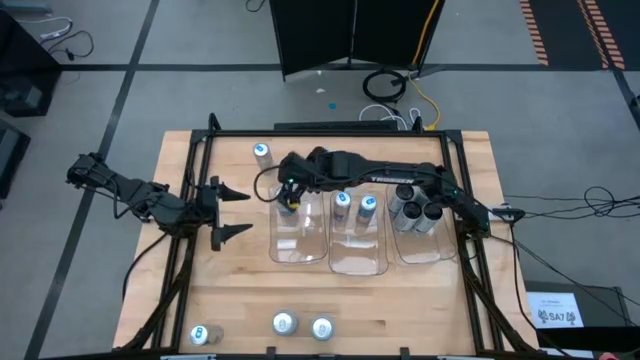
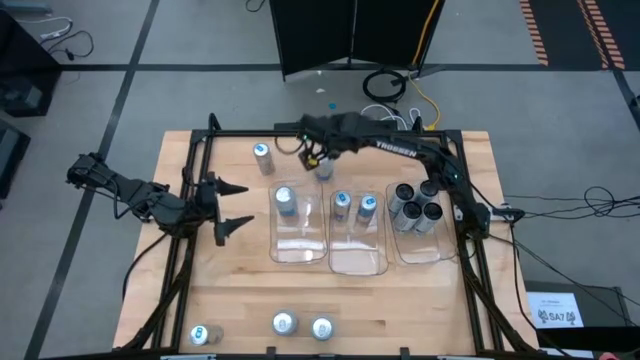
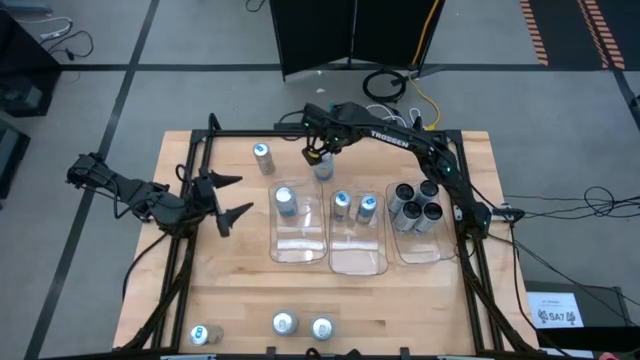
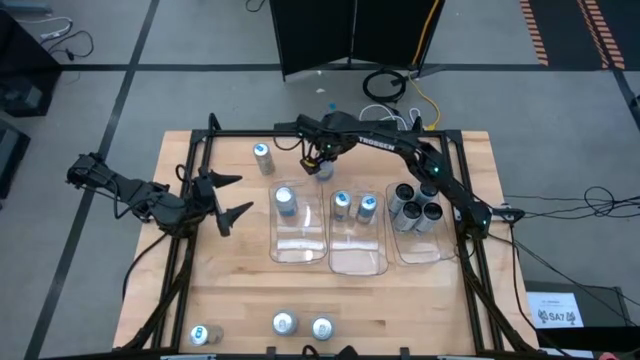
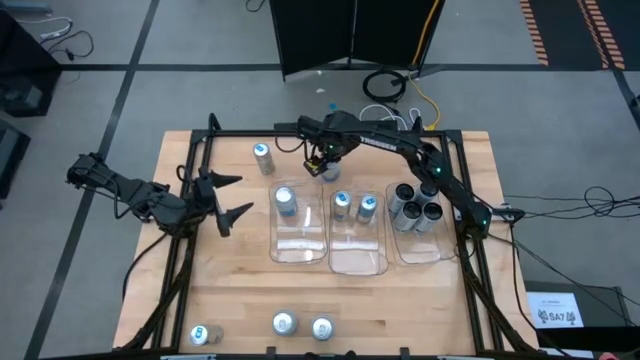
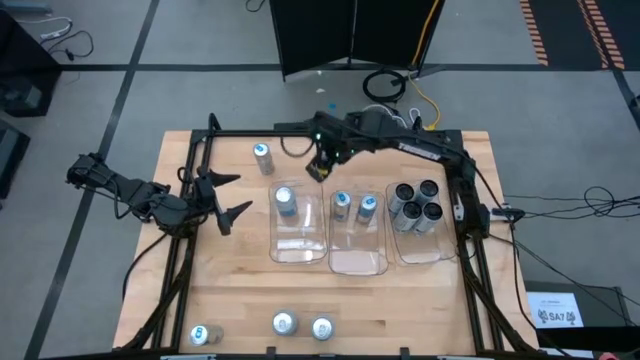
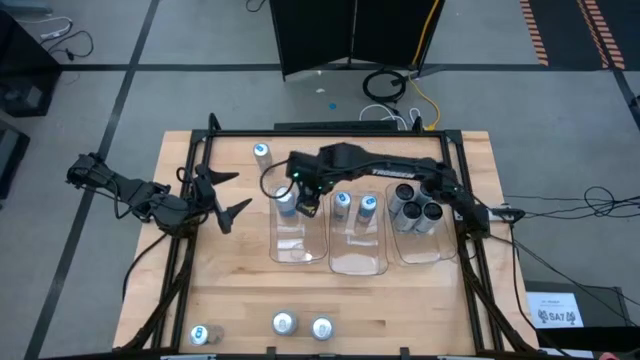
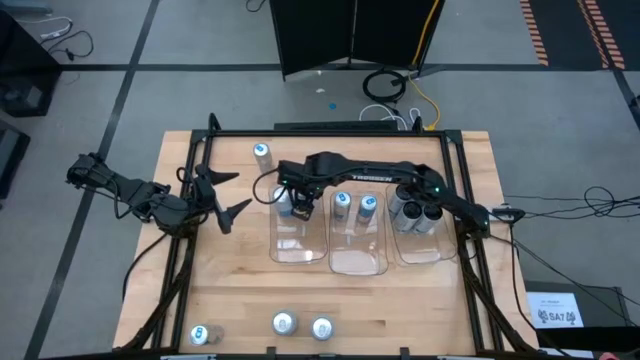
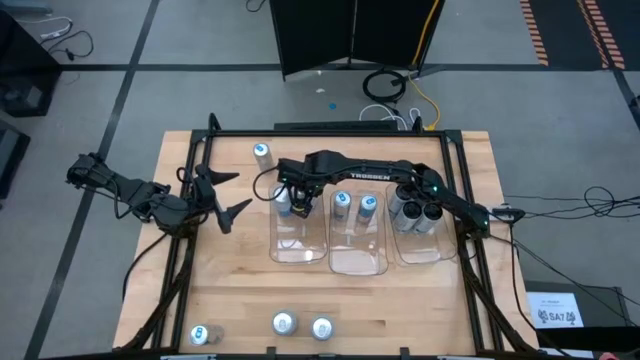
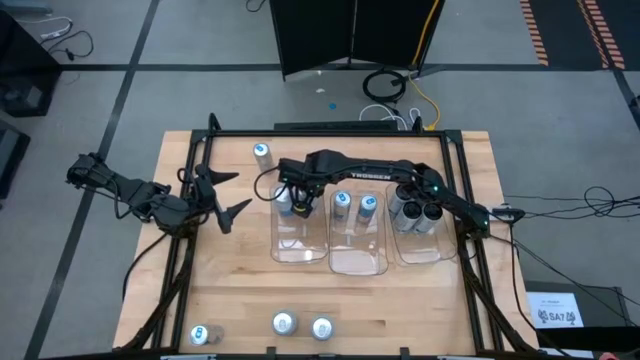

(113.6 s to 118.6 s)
Task: Sort soda cans
Put the top blue-white soda can into the left transparent bin

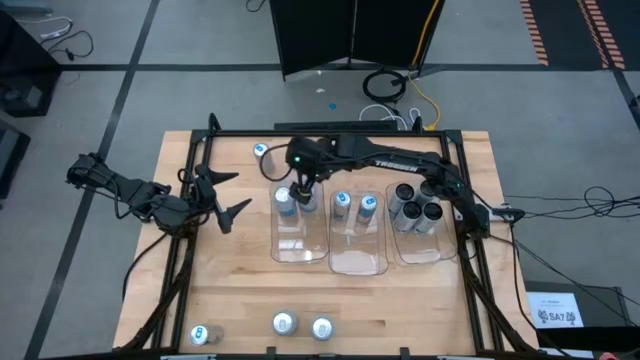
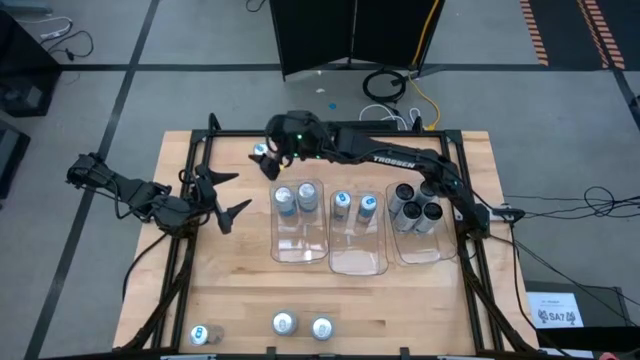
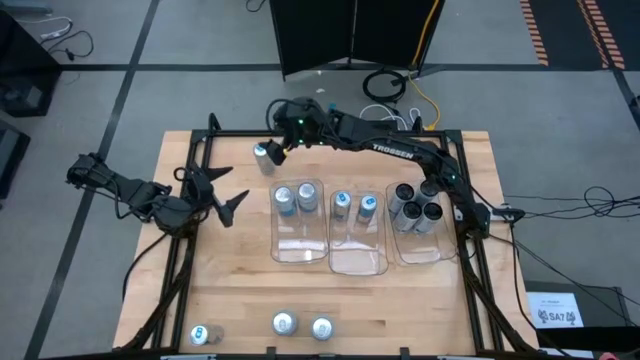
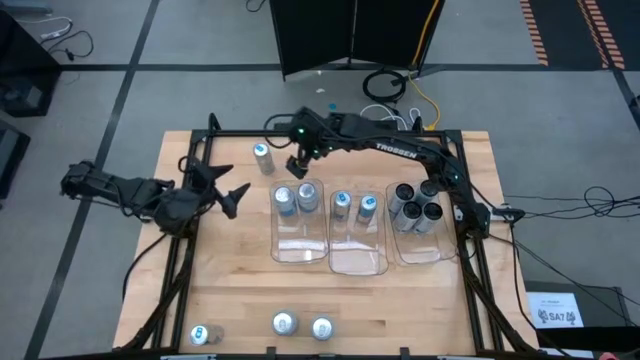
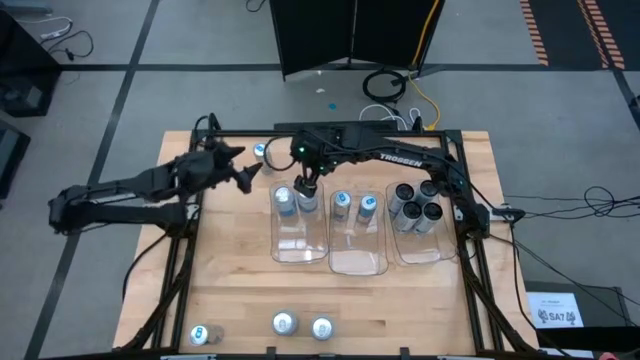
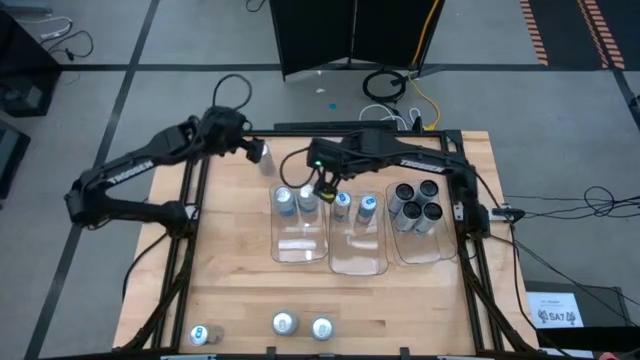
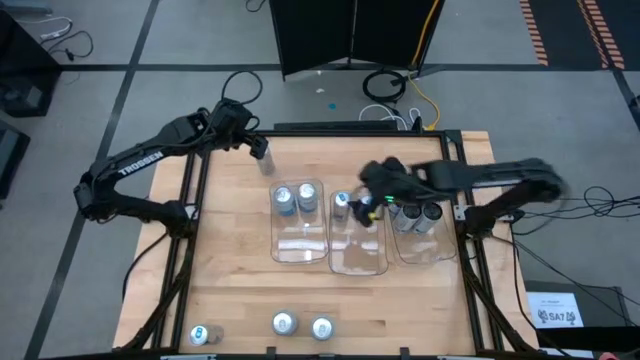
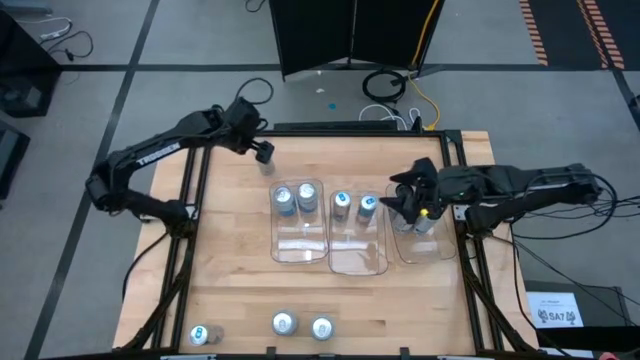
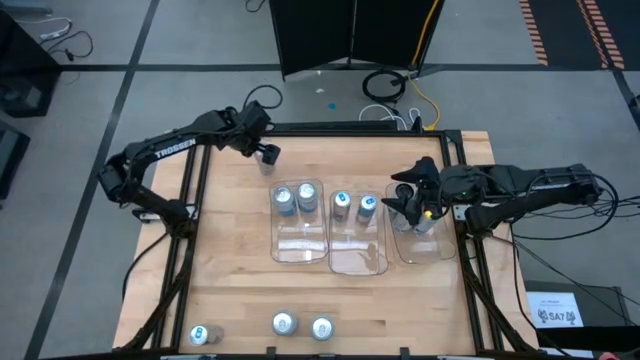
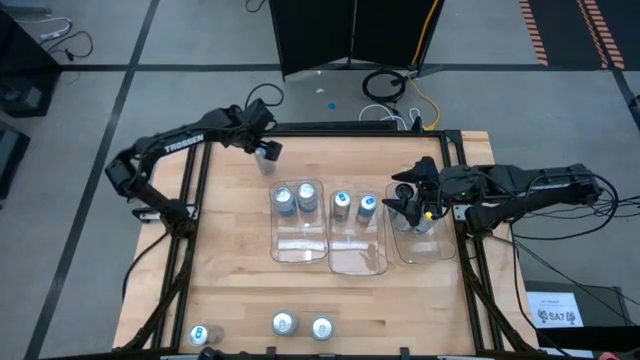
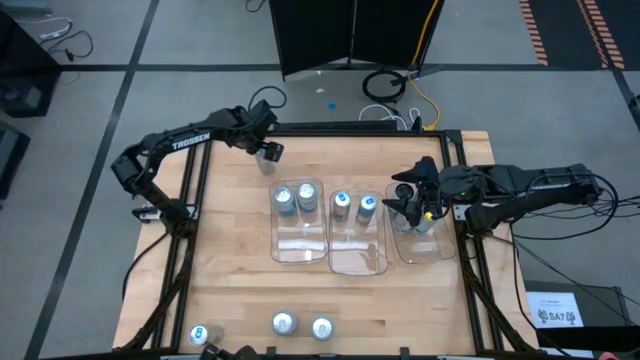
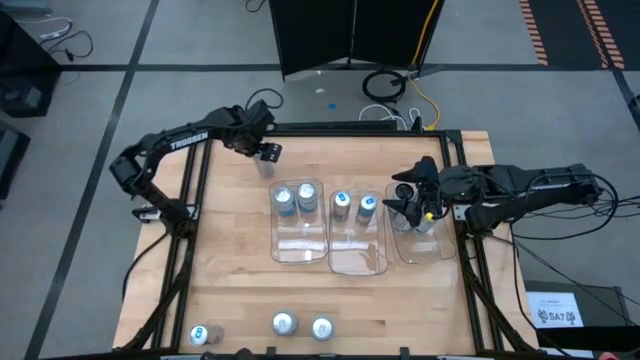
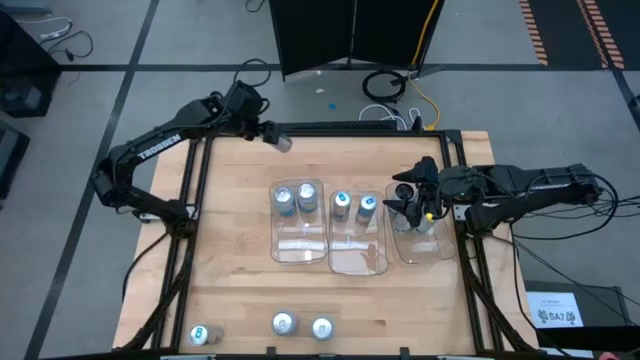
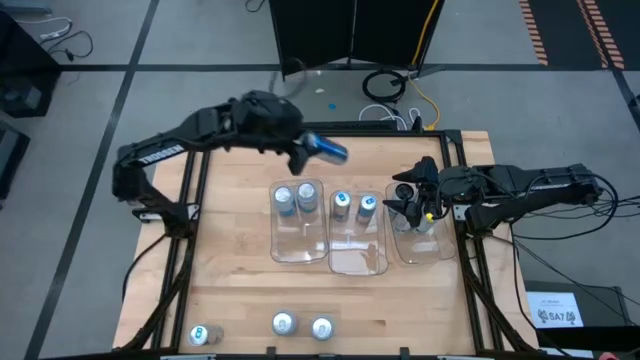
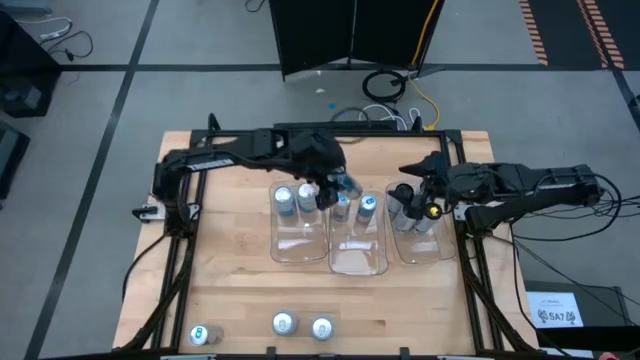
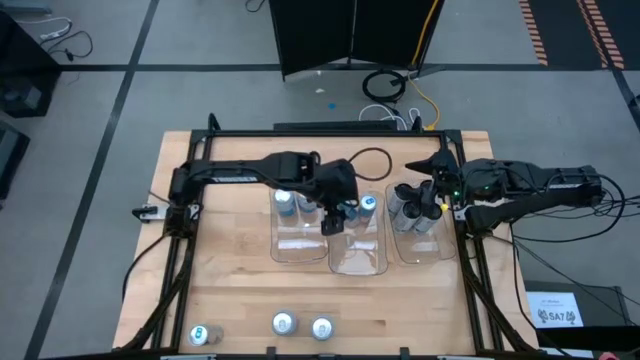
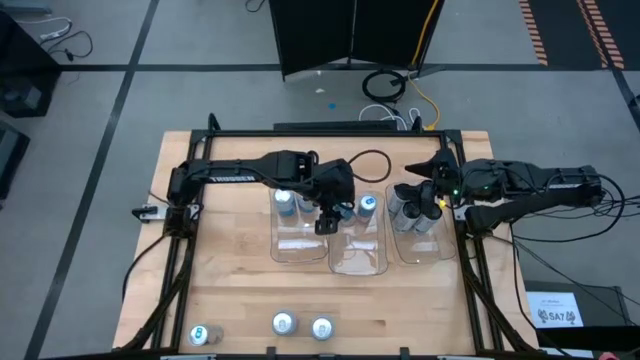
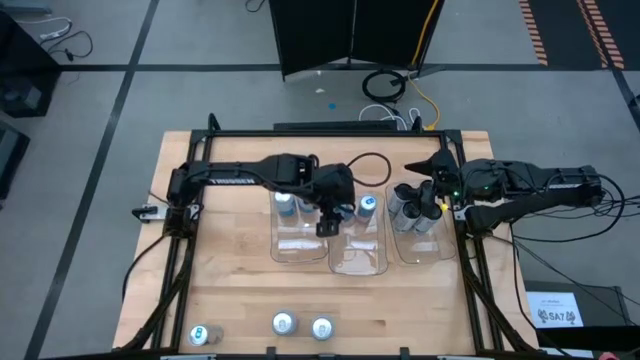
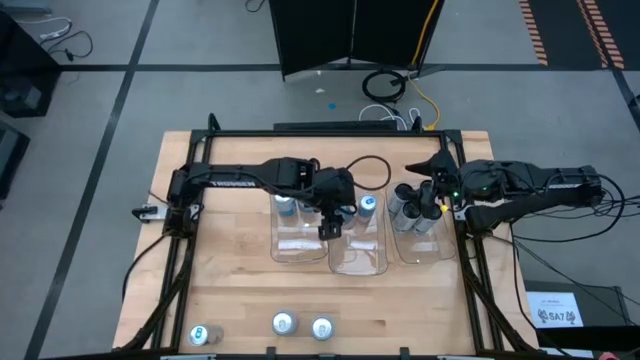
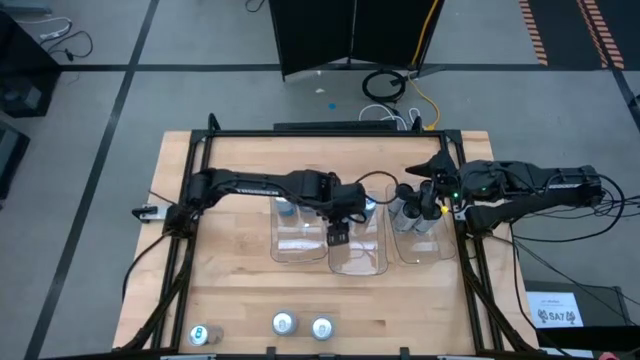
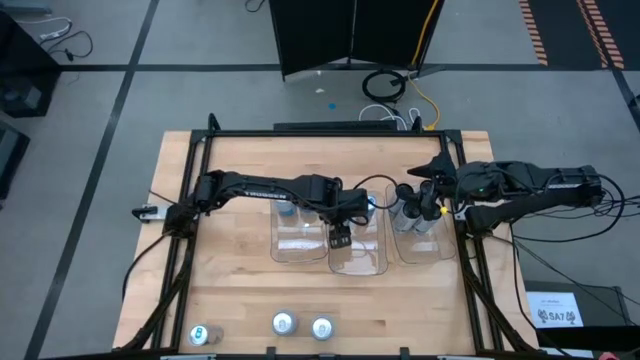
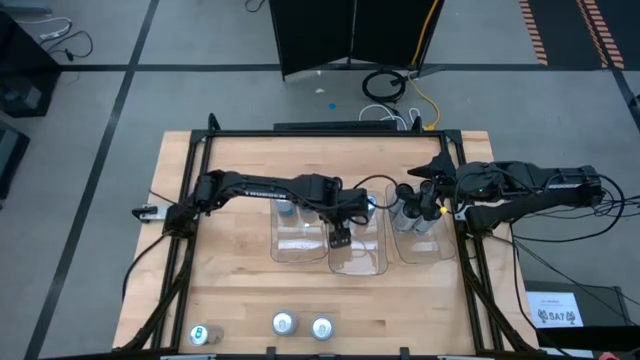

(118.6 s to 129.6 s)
Put the top blue soda can into the middle transparent bin

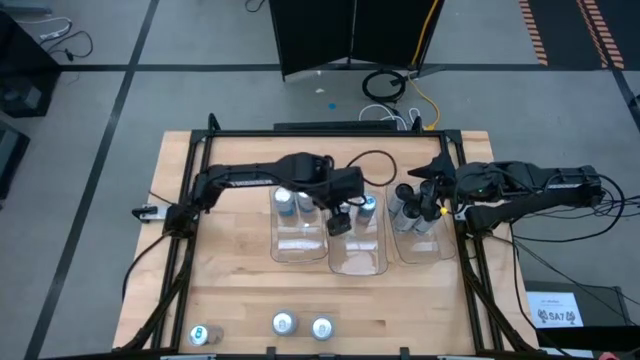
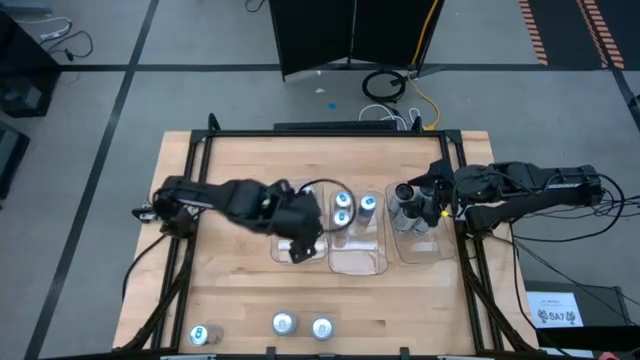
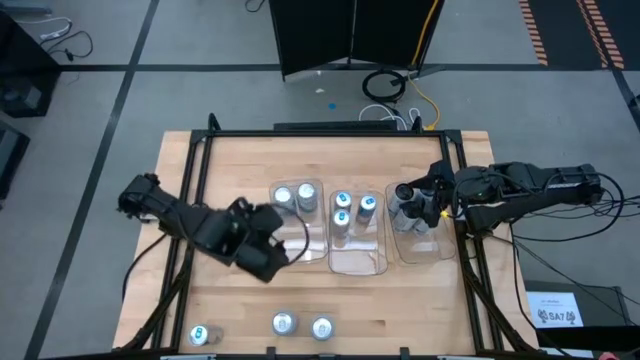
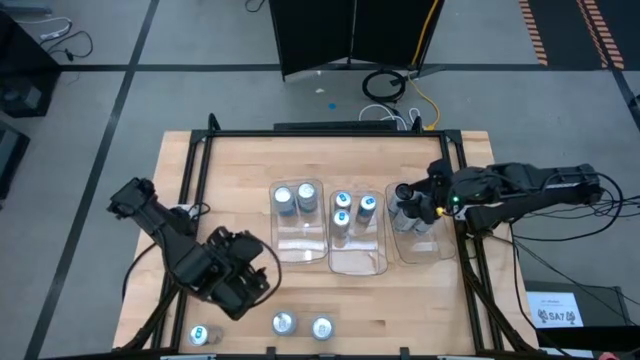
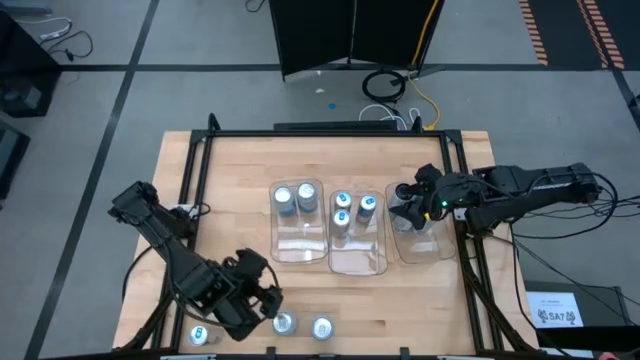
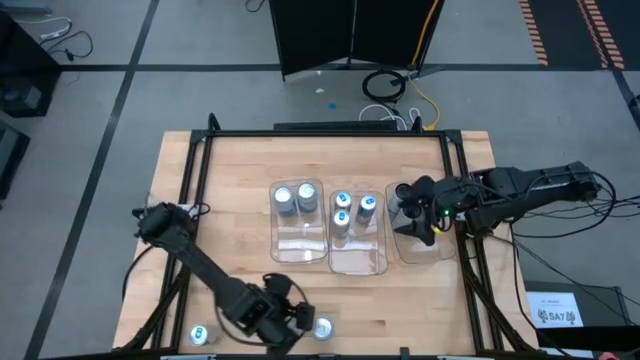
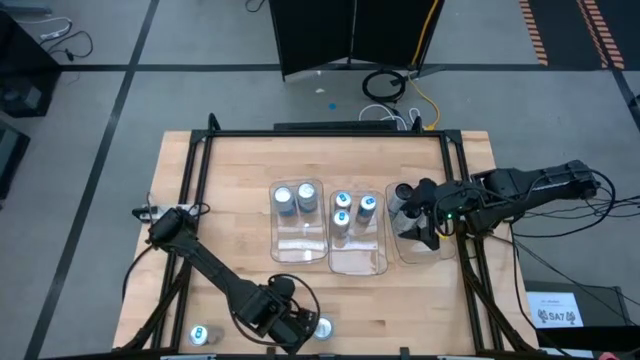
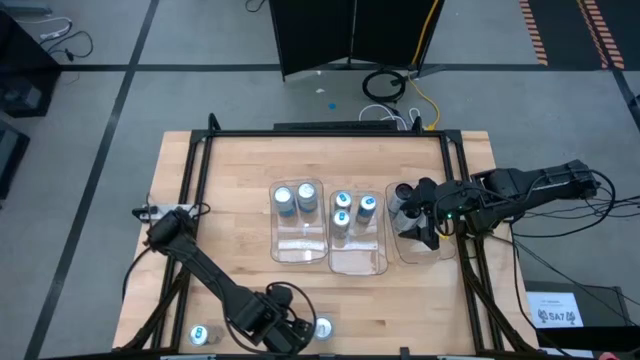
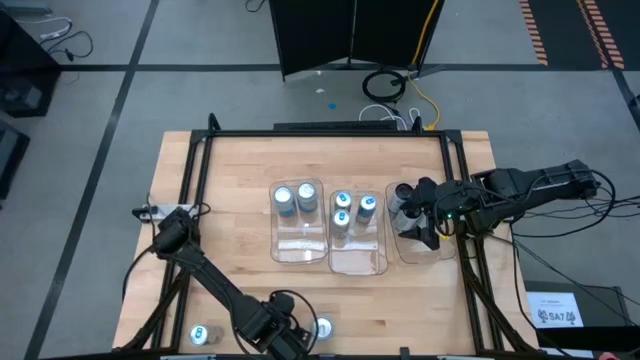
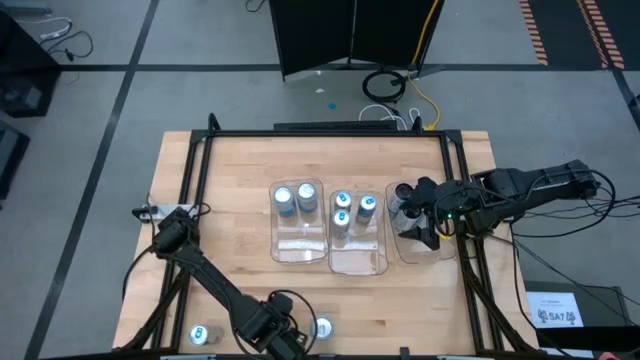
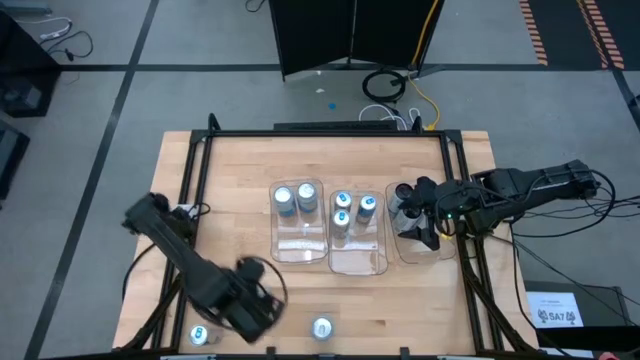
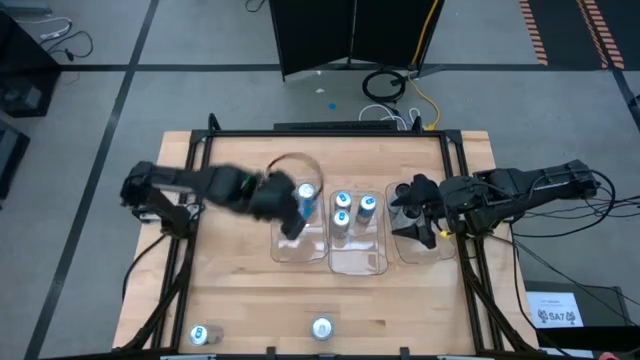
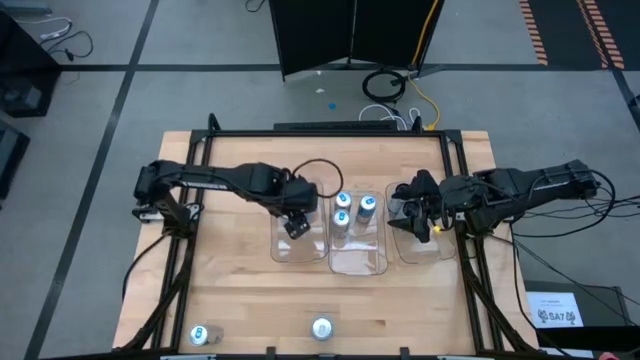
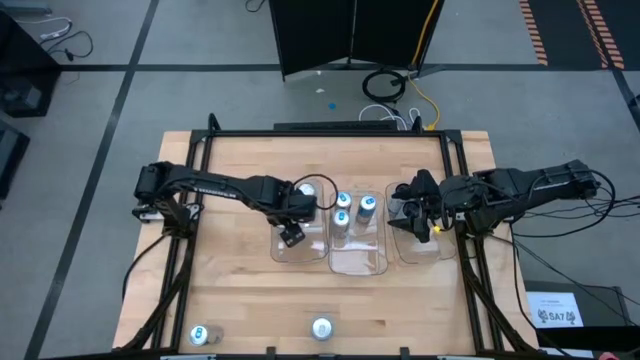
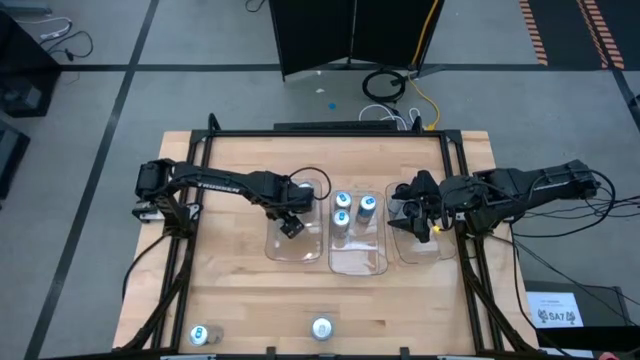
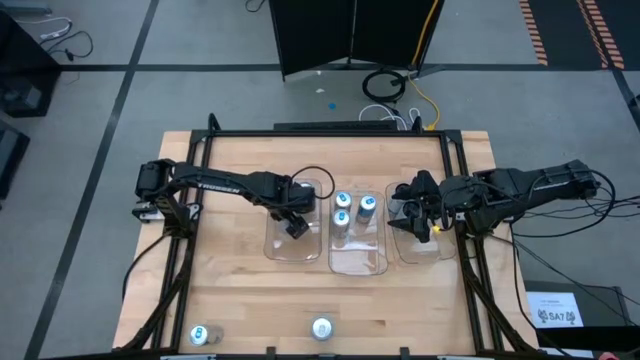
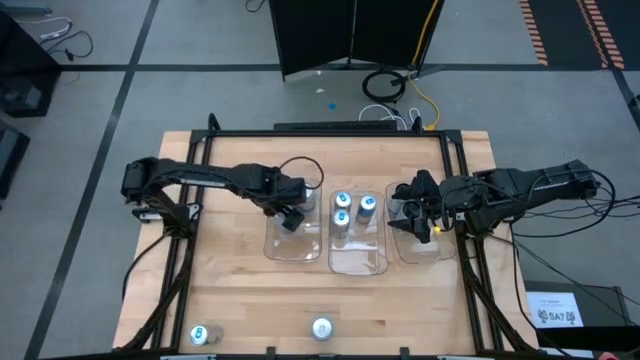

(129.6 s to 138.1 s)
Put the left blue-white soda can into the left transparent bin
